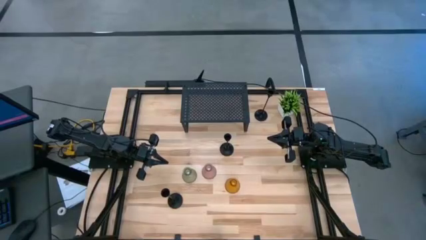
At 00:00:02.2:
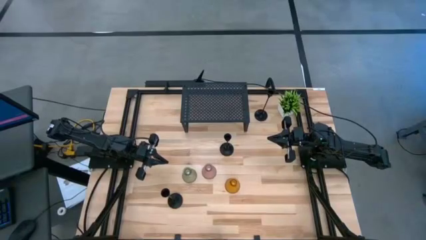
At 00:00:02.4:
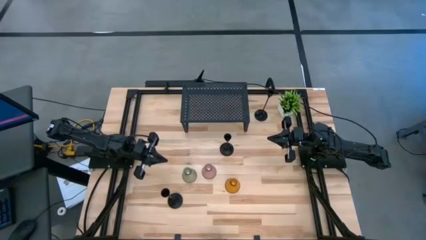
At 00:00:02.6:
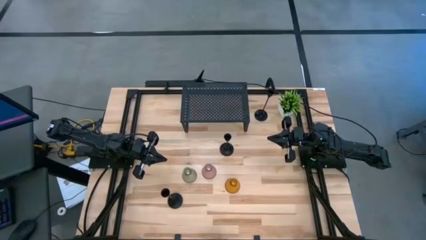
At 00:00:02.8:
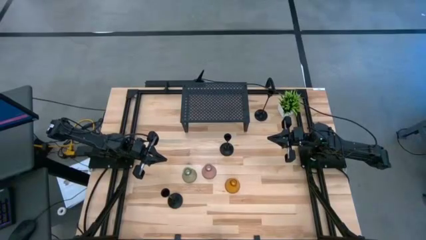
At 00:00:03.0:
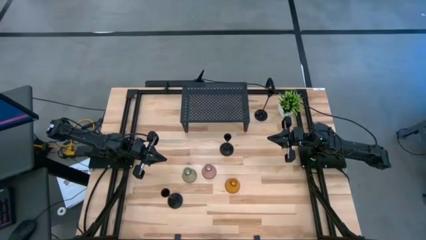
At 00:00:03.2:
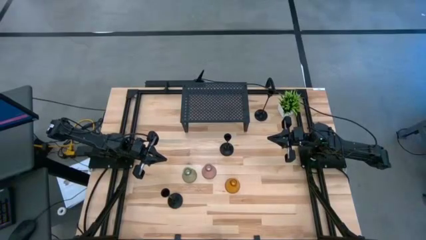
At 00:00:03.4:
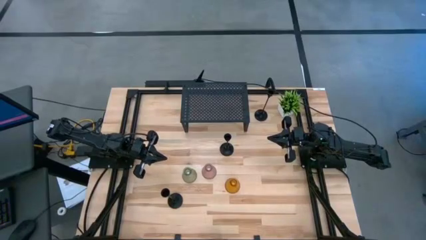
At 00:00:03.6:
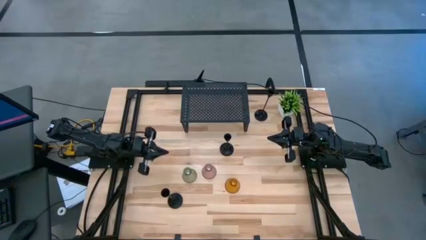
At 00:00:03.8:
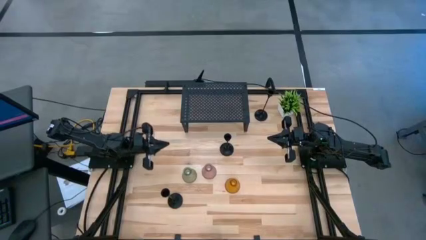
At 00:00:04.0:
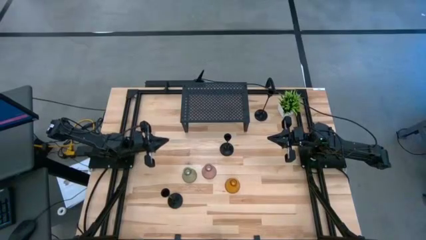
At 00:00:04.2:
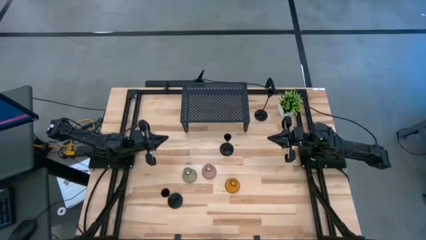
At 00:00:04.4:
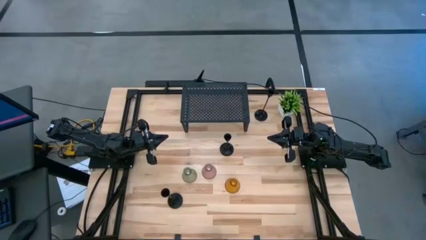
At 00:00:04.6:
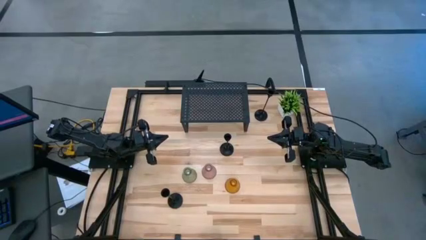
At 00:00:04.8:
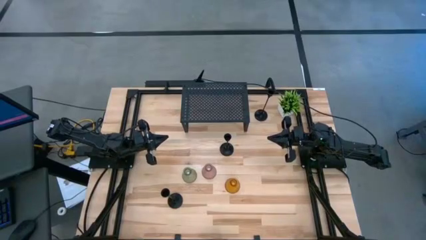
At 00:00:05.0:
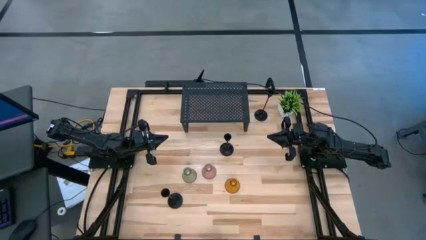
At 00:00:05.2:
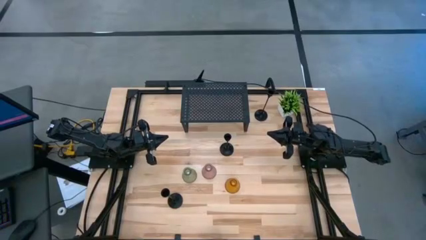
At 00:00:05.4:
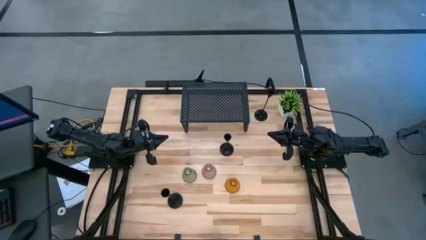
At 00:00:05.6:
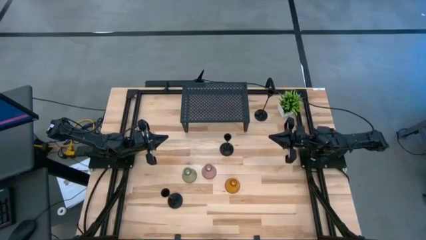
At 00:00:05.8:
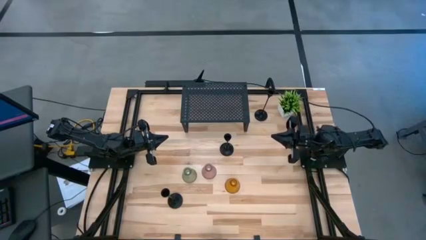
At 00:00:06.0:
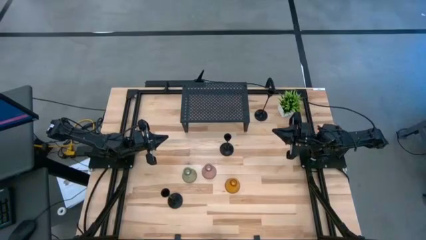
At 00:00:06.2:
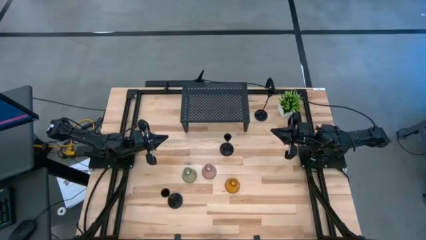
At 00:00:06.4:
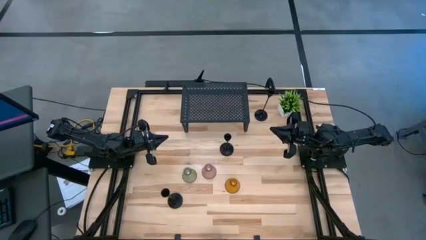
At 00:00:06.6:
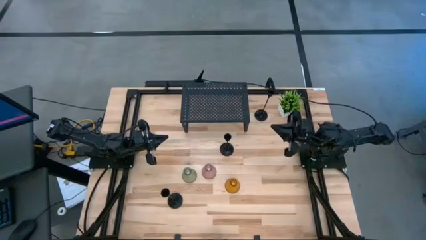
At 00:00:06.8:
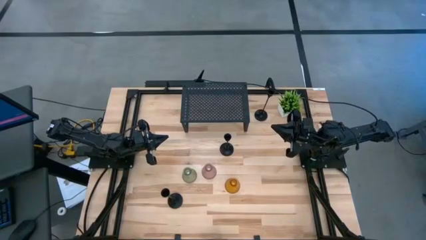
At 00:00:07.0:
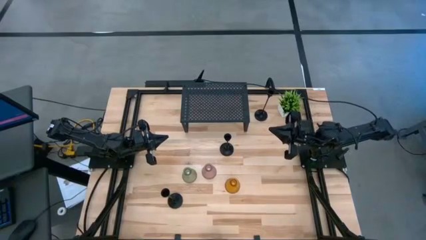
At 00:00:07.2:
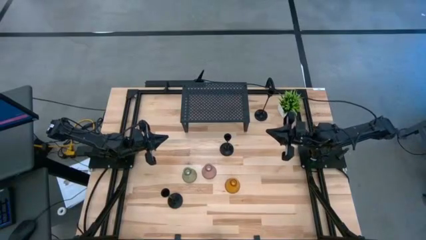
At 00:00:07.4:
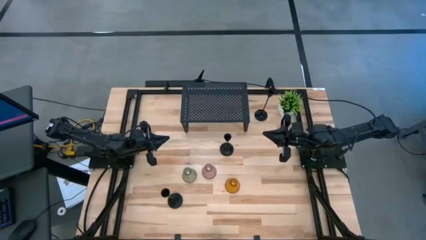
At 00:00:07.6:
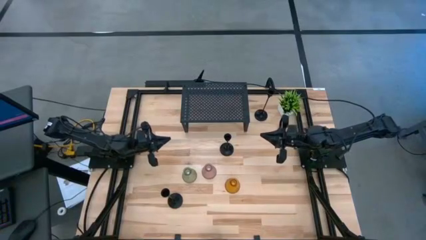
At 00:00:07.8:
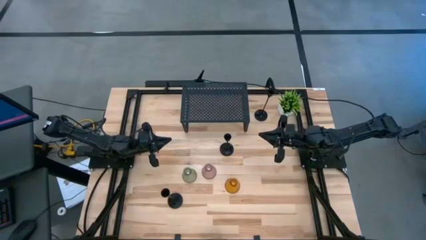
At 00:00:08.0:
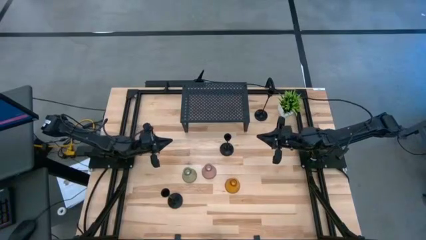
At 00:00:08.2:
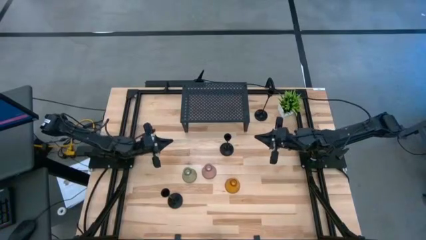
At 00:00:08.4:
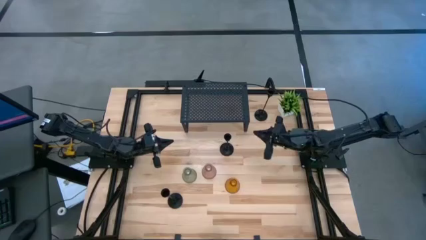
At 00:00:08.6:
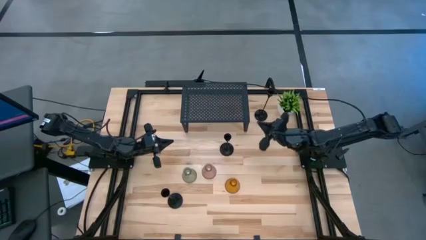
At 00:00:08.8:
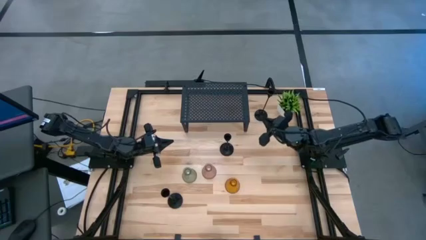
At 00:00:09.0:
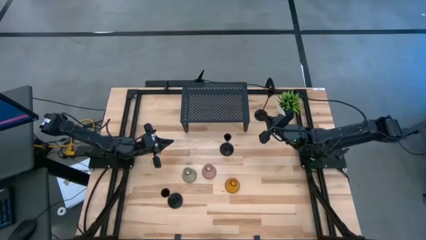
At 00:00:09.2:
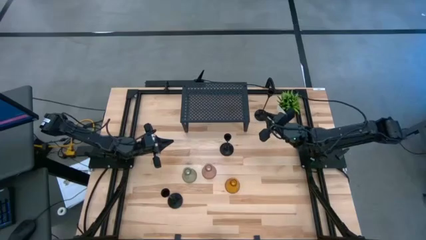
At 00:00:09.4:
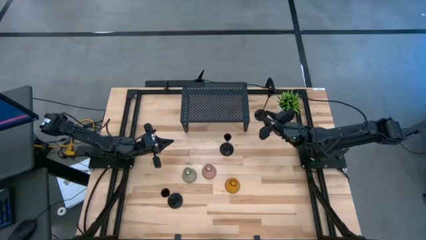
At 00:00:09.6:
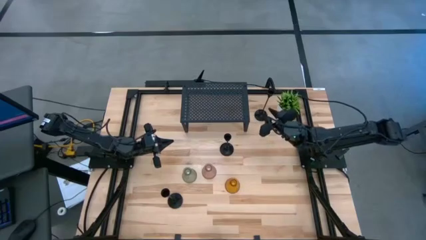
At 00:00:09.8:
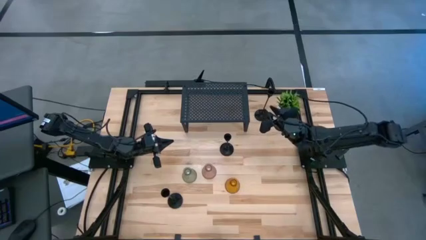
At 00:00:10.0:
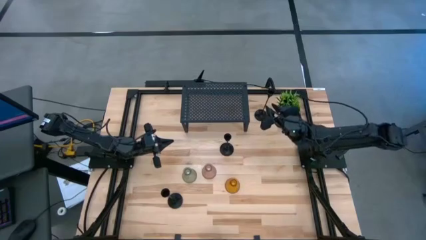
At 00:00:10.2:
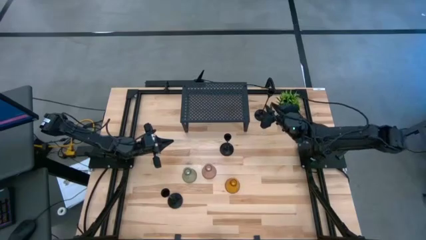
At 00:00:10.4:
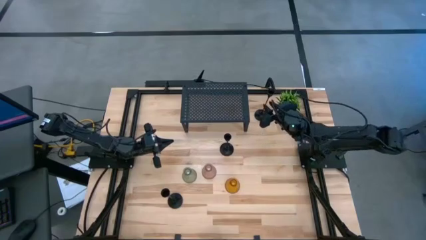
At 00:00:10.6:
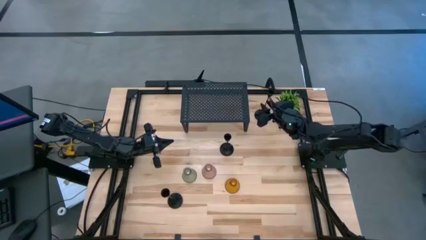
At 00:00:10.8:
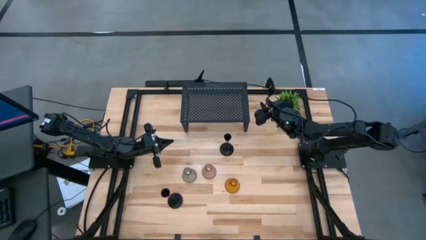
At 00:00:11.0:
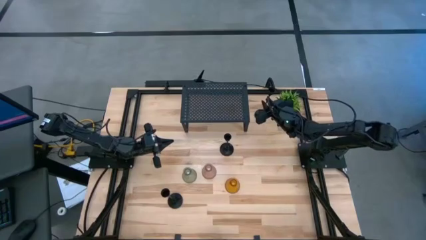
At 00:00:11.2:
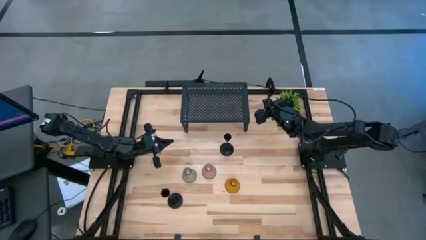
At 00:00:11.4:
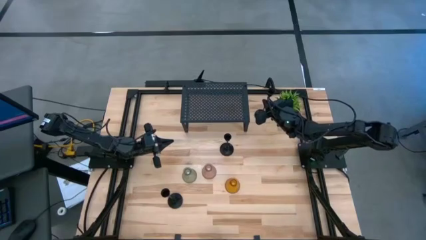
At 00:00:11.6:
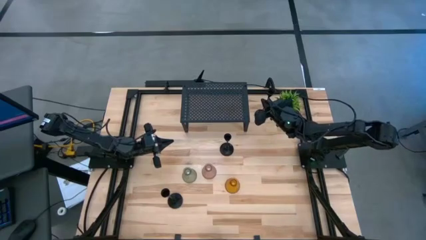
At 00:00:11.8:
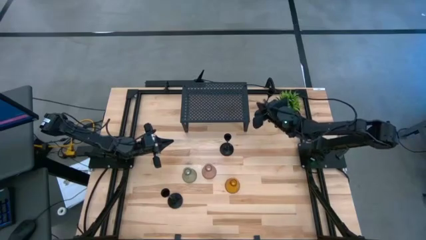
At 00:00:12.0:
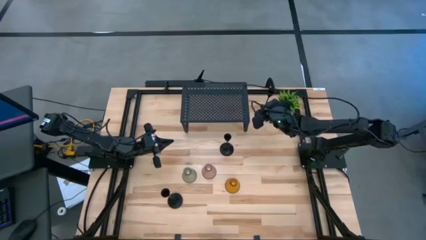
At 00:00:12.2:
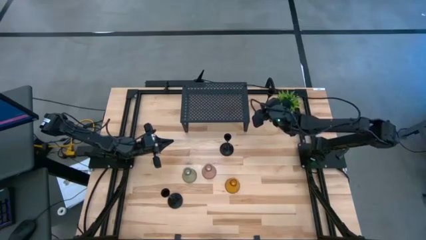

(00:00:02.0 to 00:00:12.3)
Task: Pick & Place candle stick holders
Put the top black candle holder on the shelf

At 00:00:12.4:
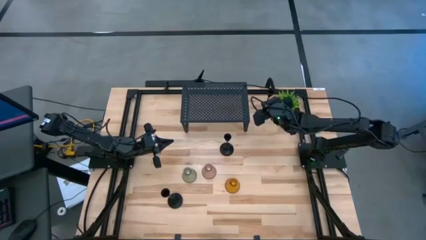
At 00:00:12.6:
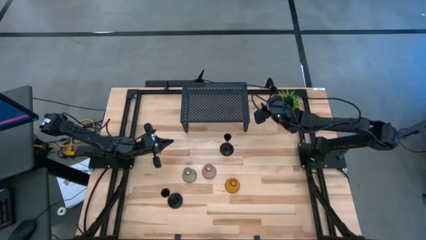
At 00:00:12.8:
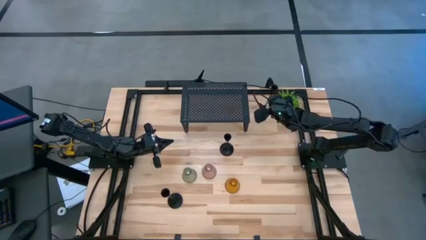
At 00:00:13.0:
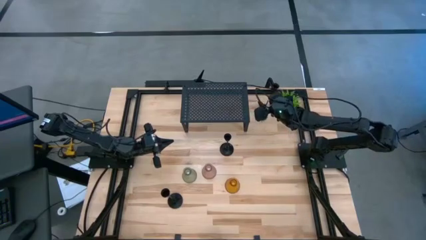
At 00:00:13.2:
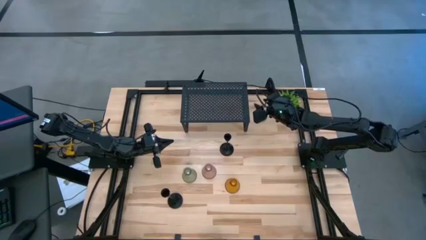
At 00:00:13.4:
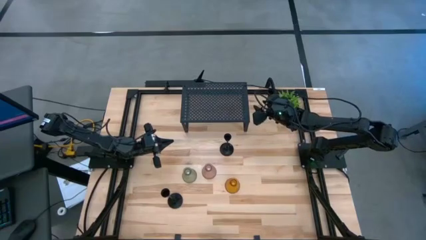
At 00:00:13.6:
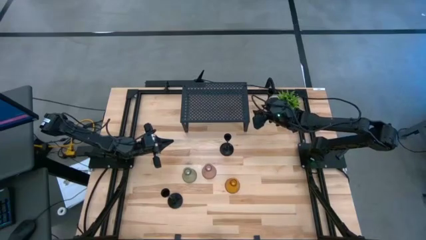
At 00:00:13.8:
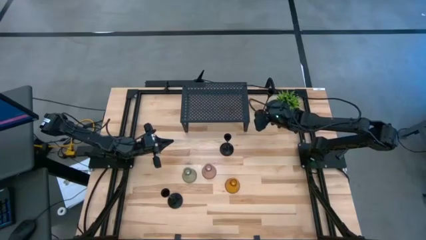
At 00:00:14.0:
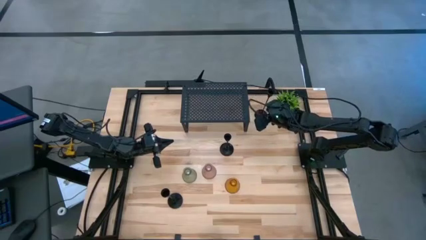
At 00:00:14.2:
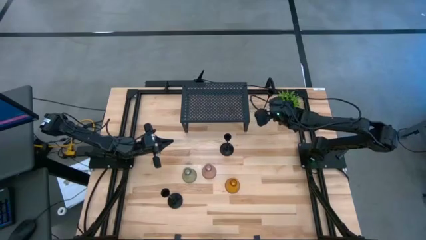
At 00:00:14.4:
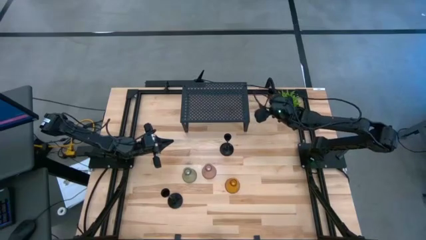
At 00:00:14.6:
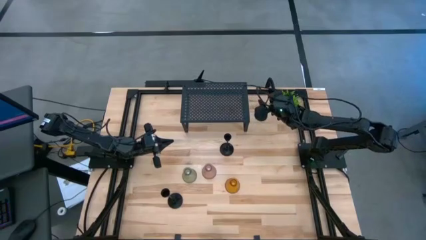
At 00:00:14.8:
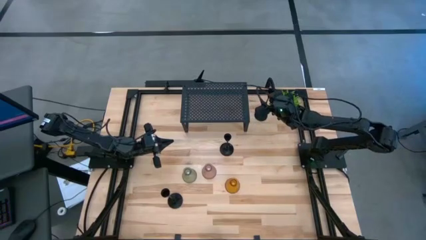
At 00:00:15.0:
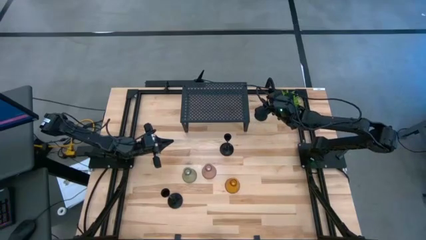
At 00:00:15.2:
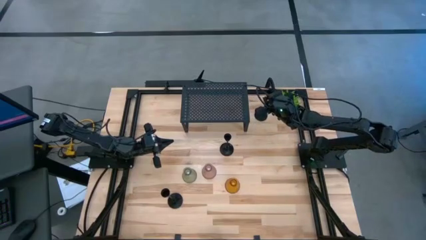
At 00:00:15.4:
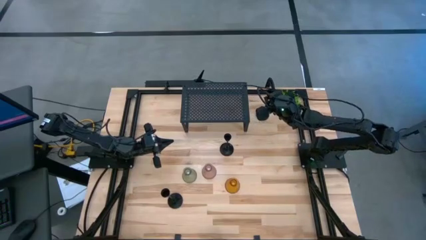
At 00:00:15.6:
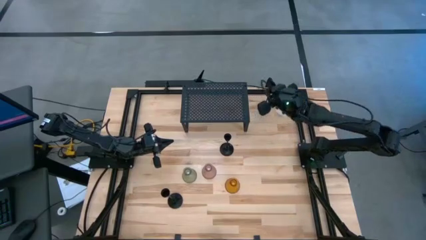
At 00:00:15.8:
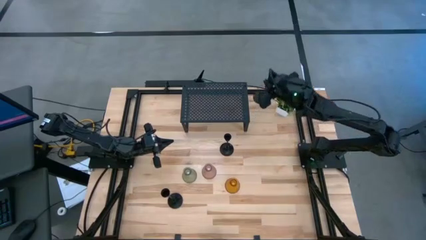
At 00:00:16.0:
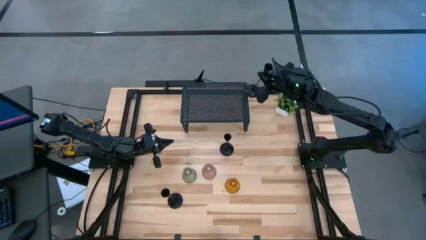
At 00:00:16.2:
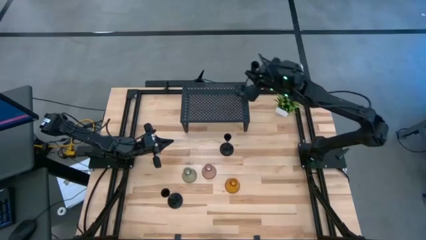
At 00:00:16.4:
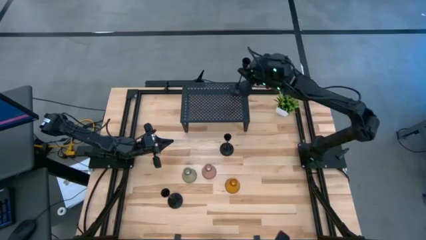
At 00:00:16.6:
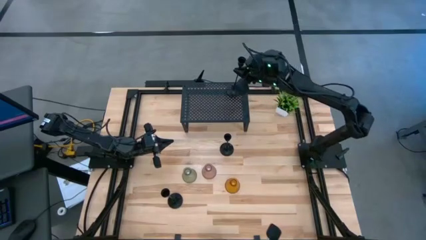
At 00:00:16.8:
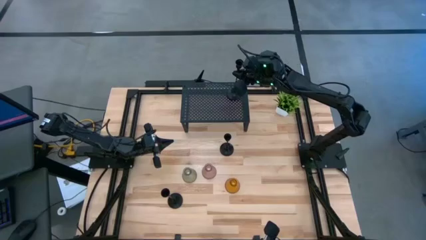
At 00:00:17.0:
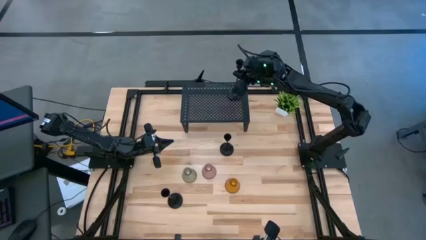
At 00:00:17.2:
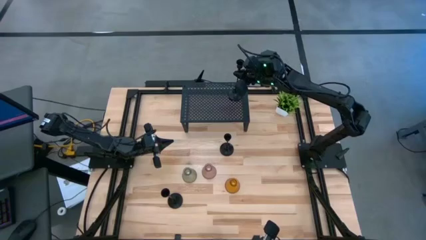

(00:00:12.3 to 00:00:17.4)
Put the top black candle holder on the shelf
